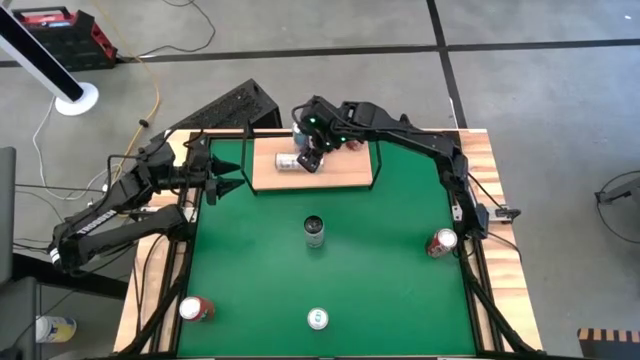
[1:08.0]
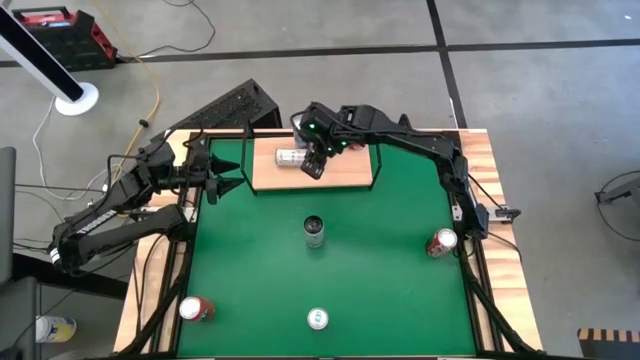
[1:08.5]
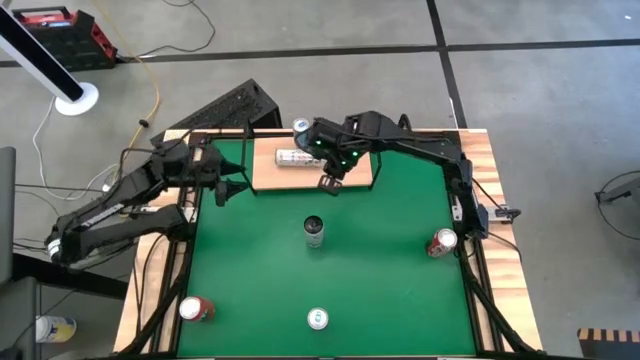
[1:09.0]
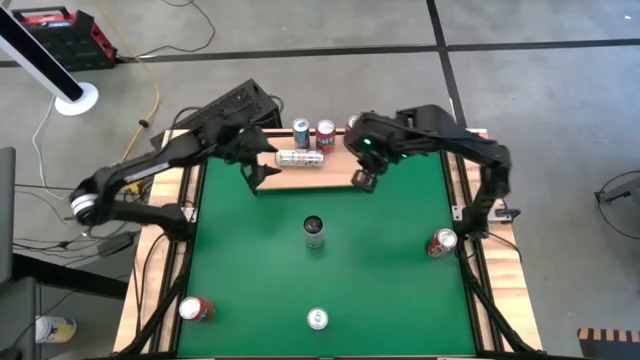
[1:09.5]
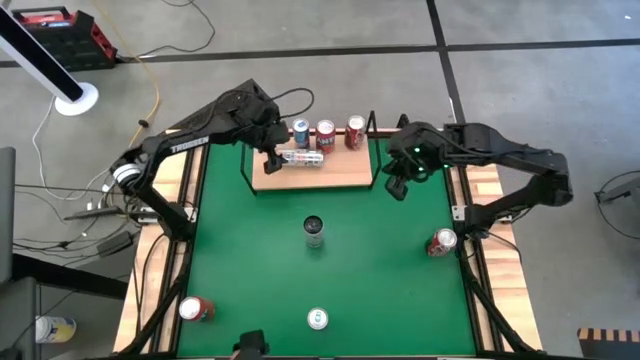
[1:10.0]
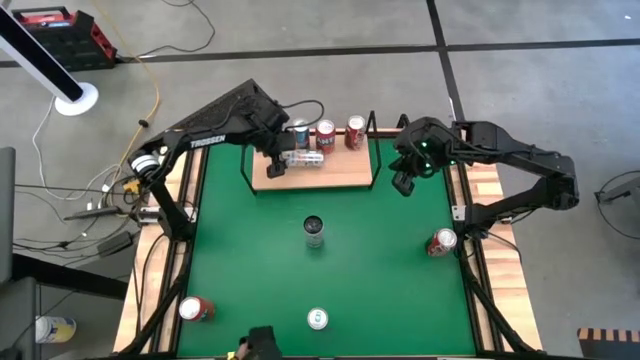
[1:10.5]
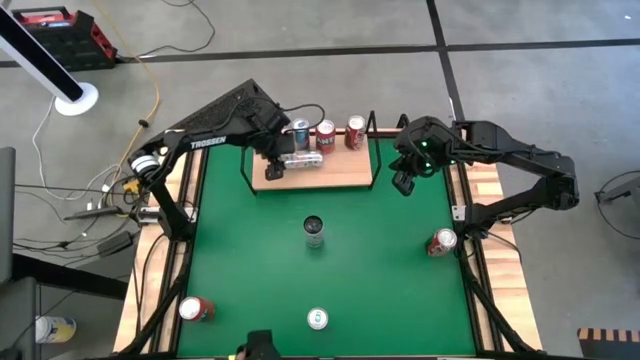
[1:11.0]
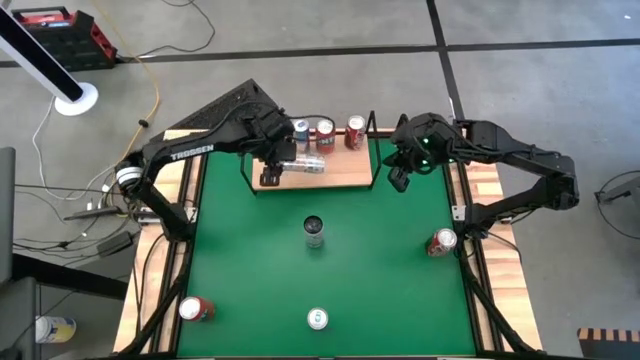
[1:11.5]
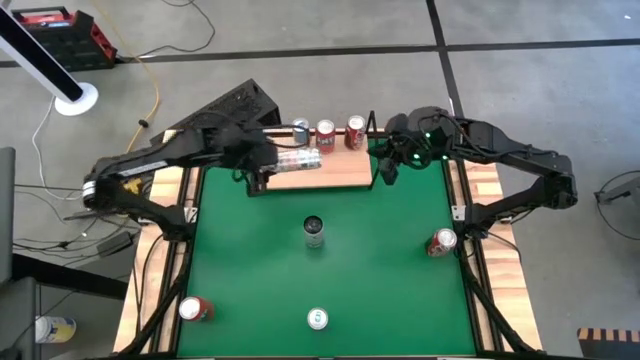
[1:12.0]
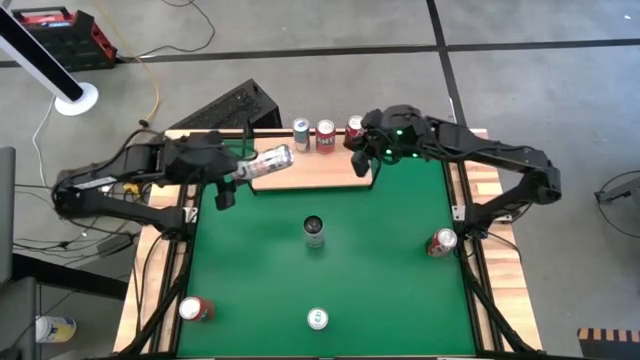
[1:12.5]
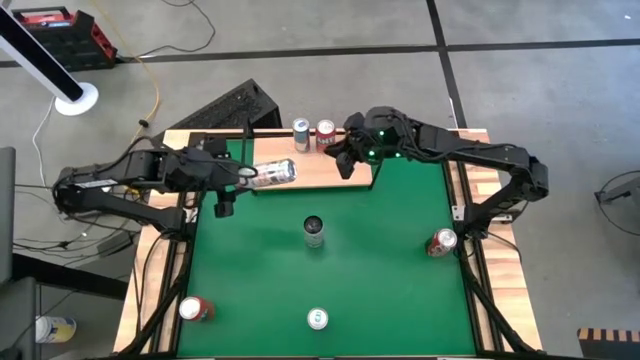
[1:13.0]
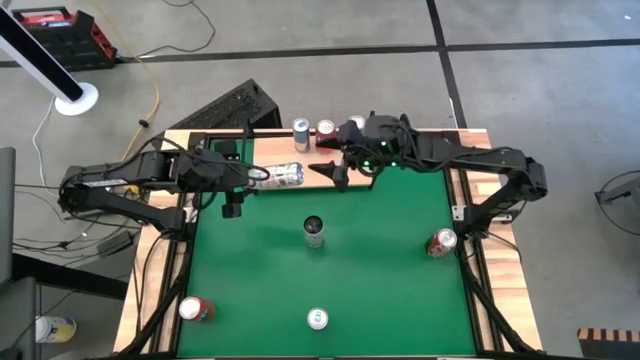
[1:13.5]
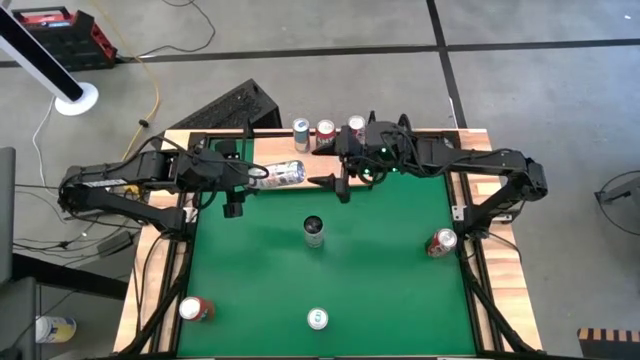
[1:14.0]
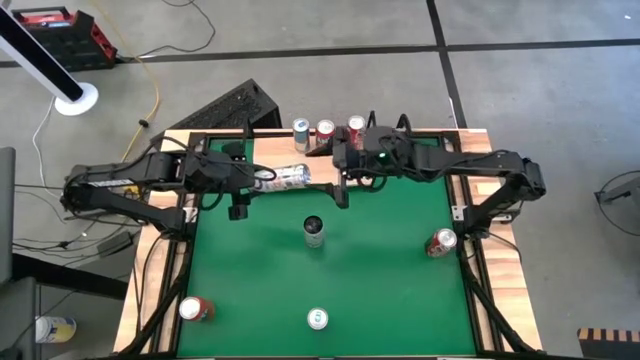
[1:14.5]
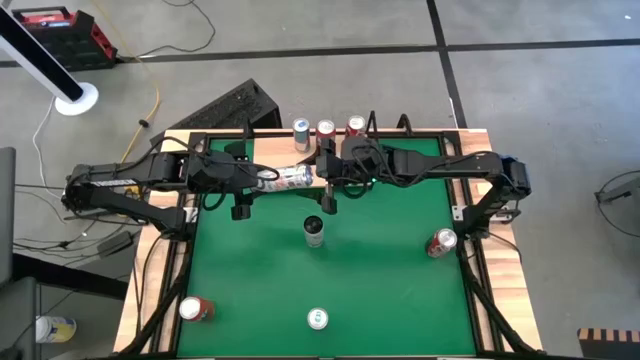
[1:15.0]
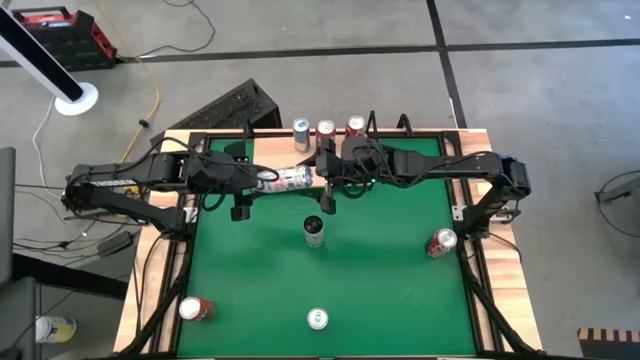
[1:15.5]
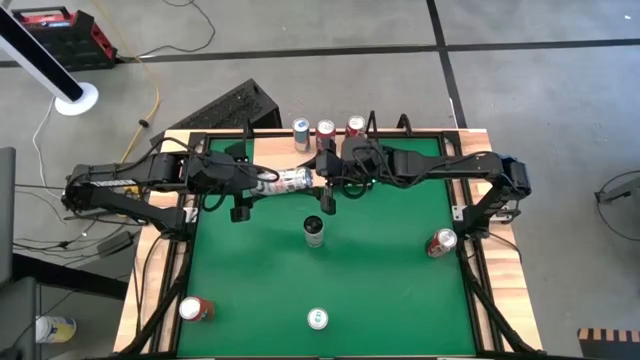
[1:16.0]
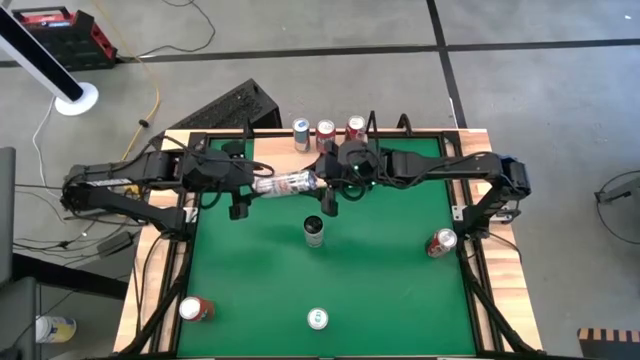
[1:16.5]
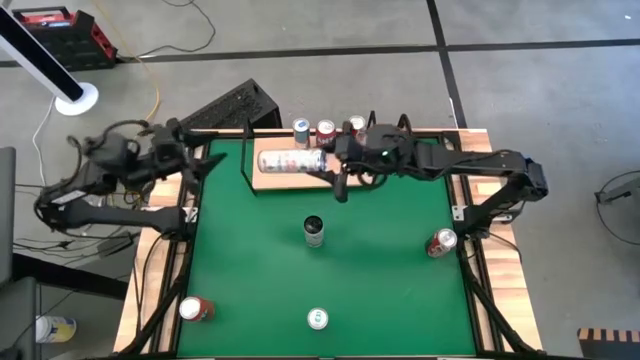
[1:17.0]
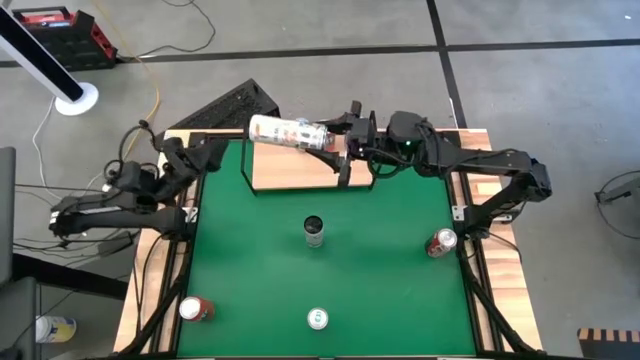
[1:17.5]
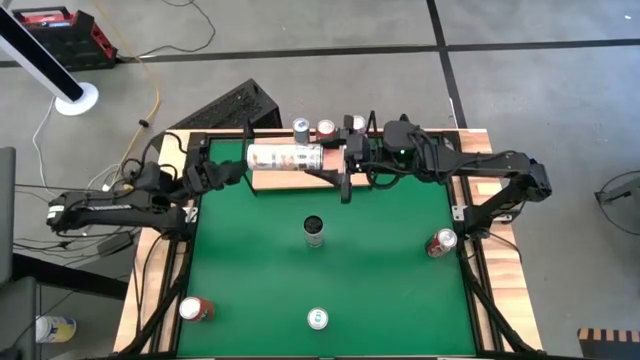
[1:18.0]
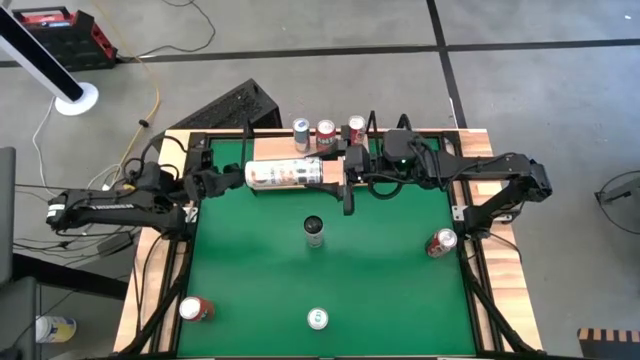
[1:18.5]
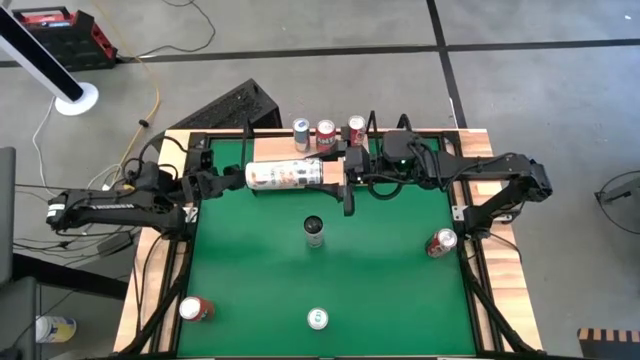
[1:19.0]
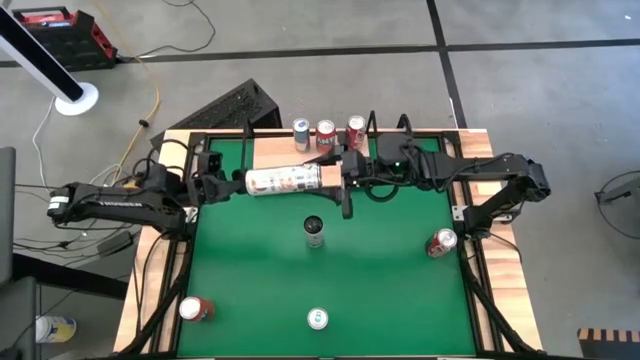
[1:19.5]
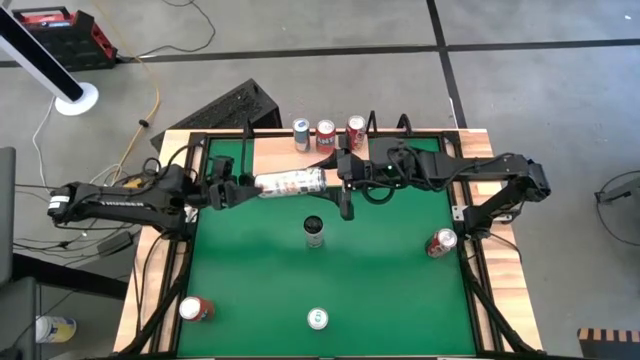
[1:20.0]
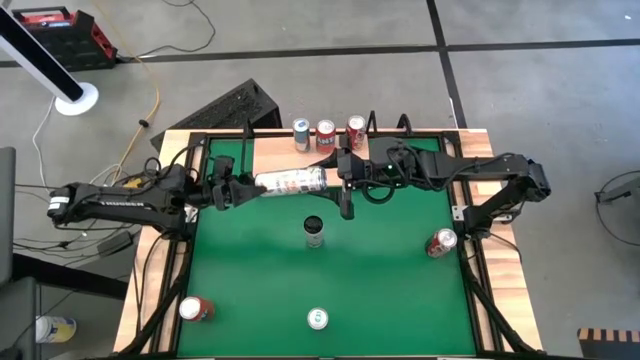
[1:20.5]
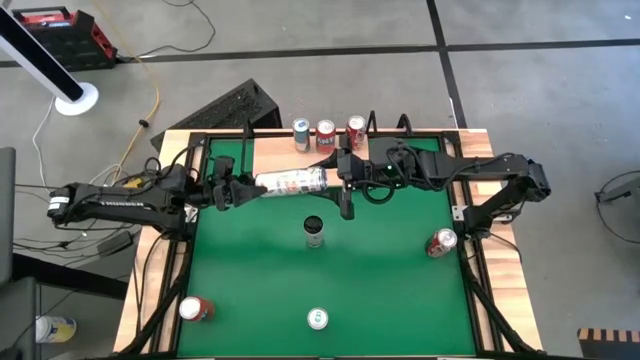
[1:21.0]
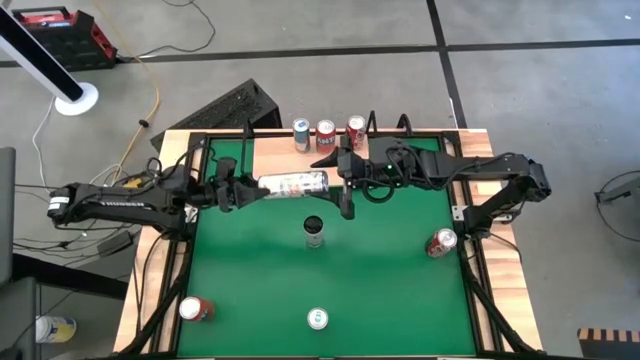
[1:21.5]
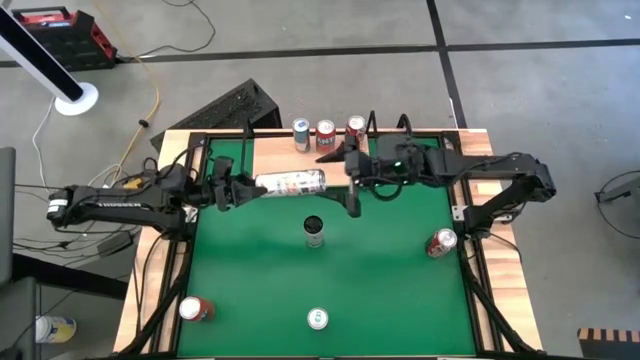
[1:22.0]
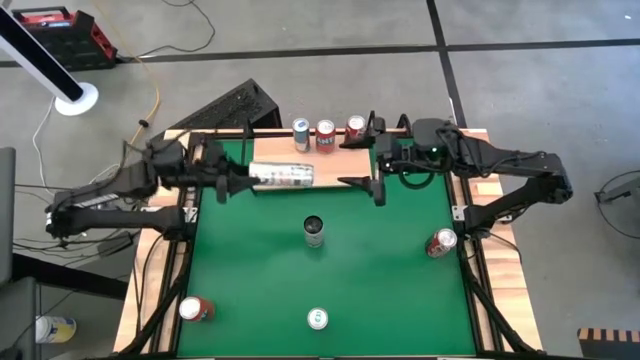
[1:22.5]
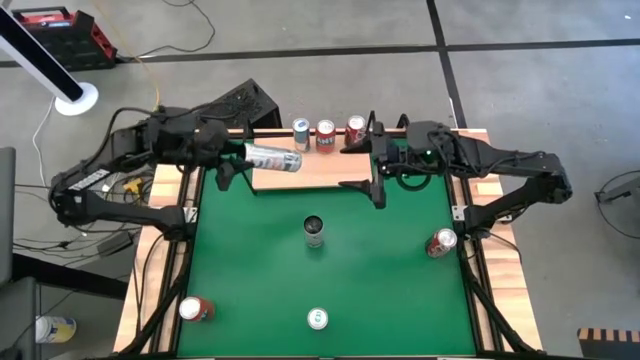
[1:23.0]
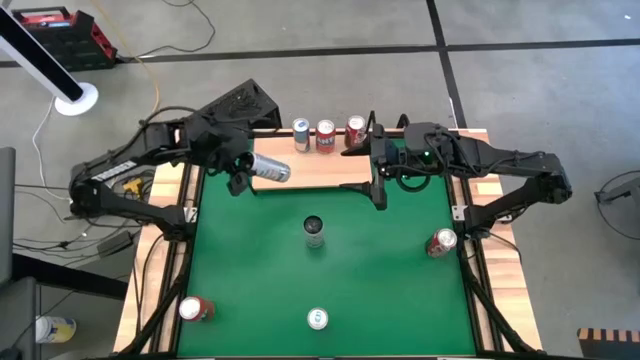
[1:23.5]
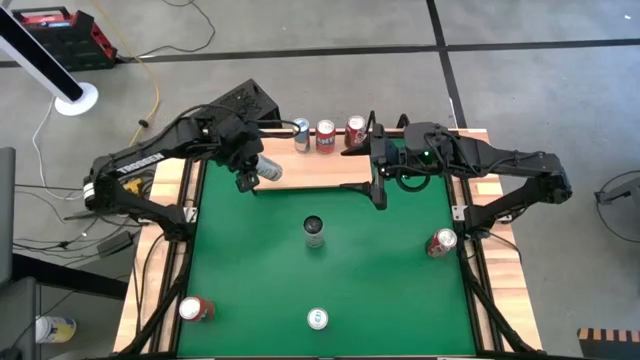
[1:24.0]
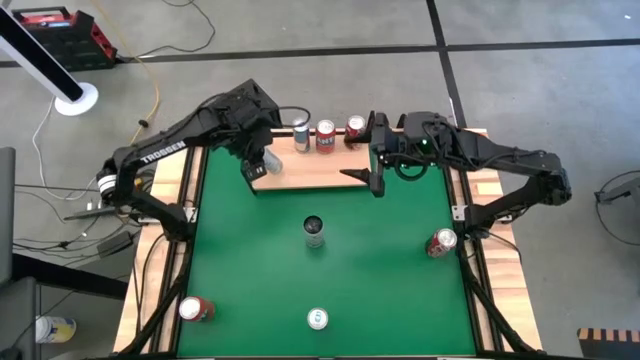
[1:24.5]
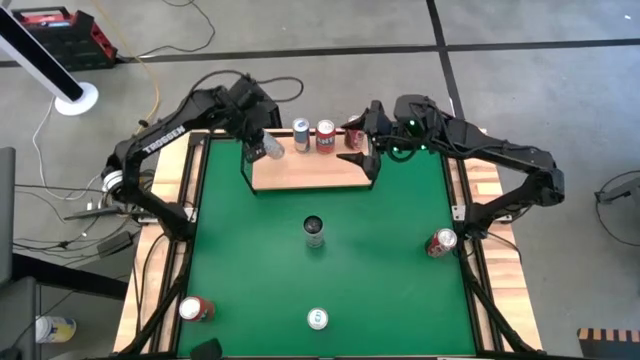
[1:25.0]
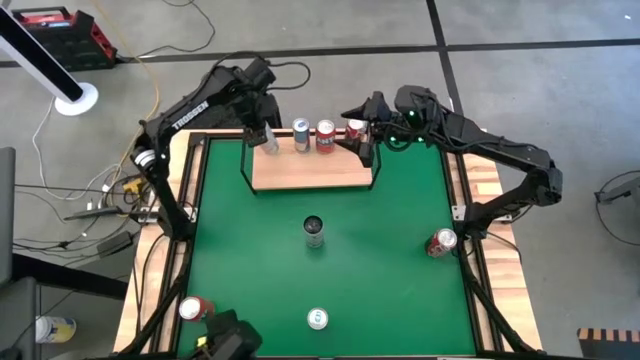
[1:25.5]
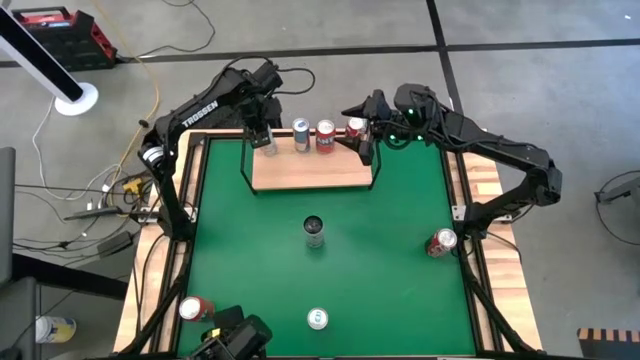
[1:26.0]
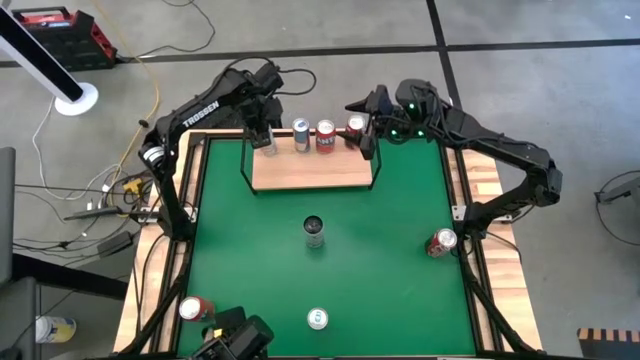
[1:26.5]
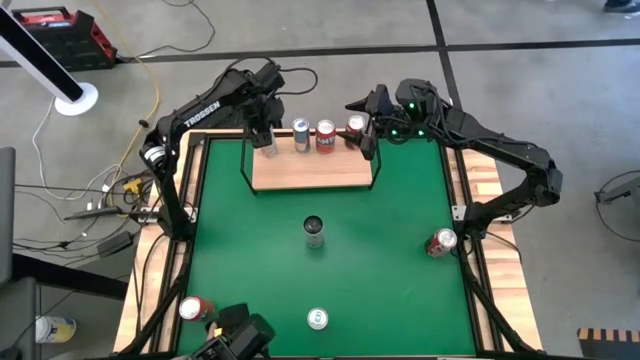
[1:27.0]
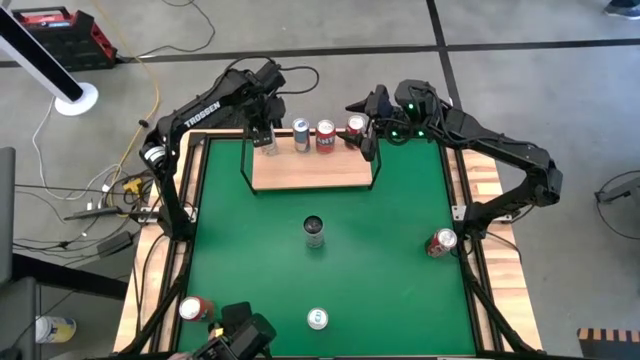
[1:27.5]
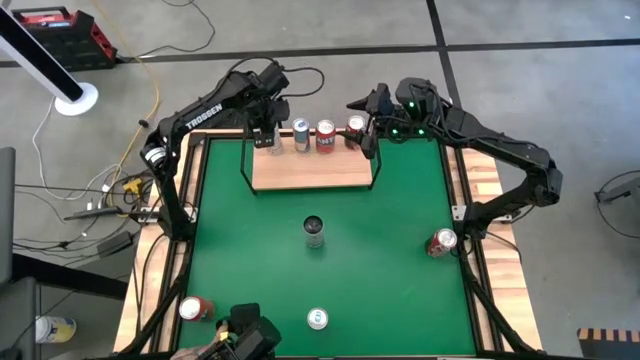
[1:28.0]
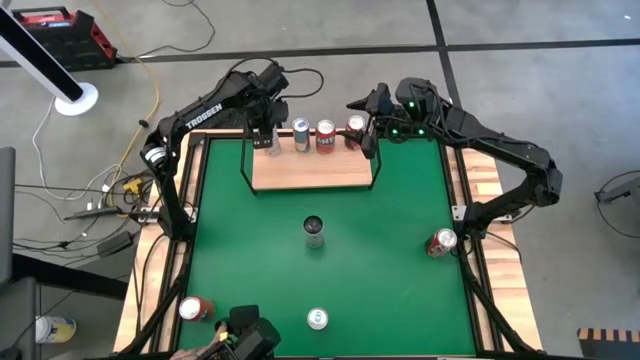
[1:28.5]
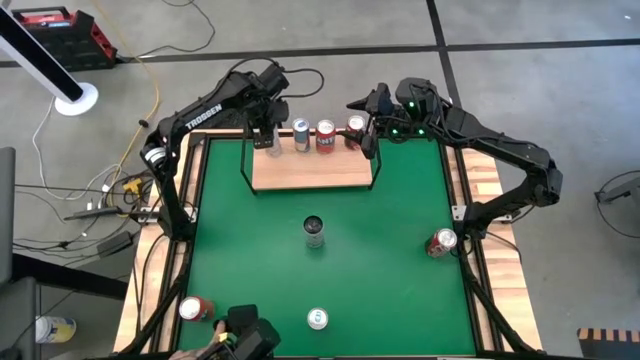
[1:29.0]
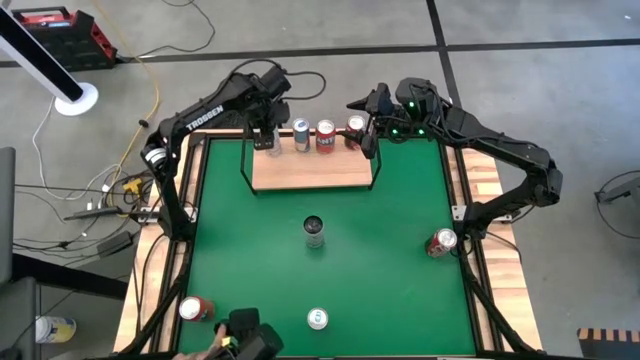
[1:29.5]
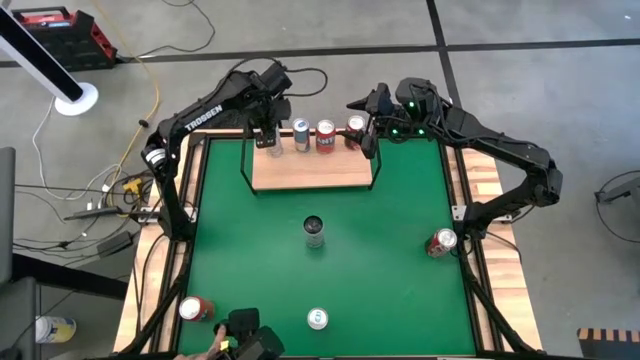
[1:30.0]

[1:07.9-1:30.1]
Task: Place canned beverage on shelf
Put the top white soda can on the shelf
